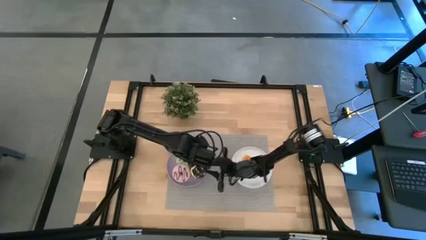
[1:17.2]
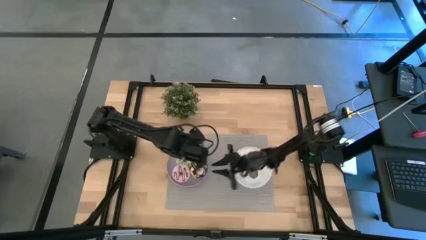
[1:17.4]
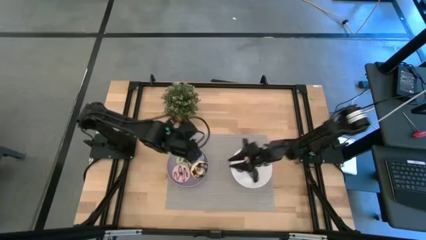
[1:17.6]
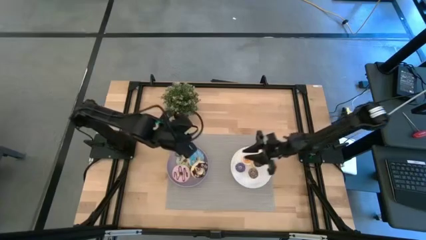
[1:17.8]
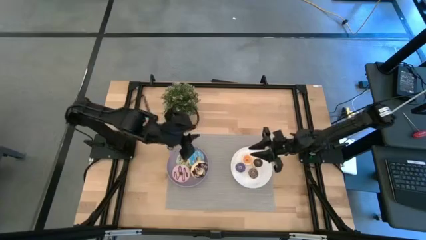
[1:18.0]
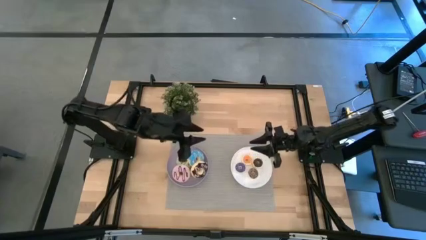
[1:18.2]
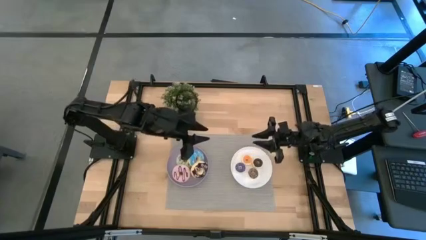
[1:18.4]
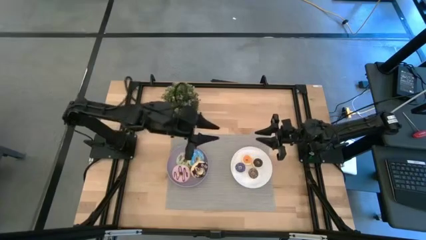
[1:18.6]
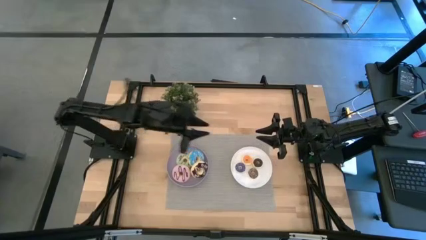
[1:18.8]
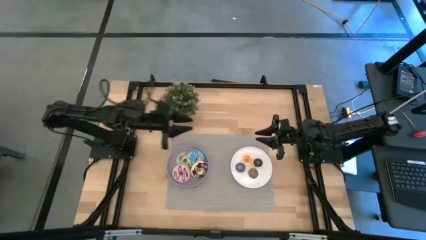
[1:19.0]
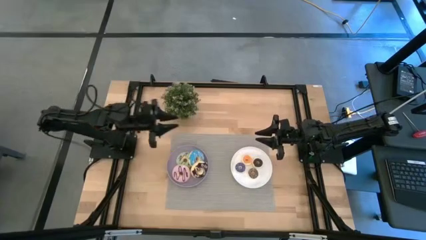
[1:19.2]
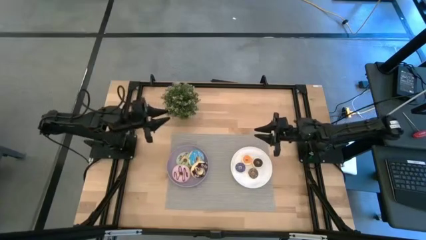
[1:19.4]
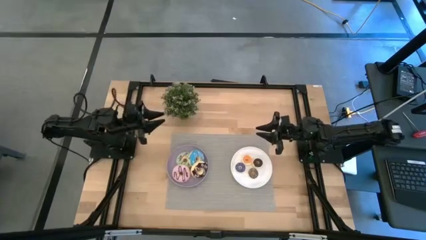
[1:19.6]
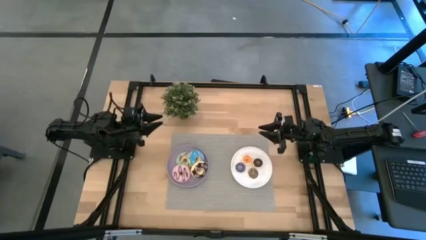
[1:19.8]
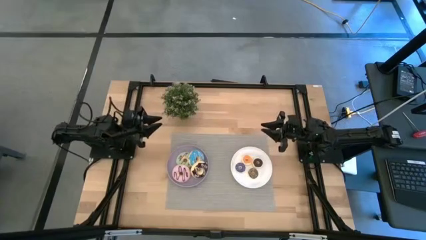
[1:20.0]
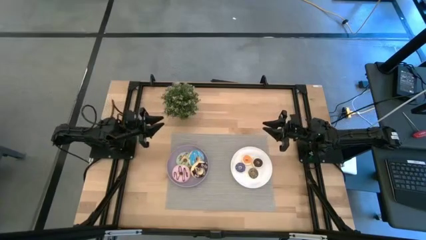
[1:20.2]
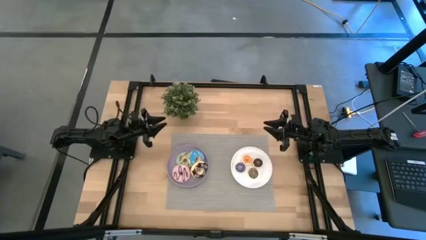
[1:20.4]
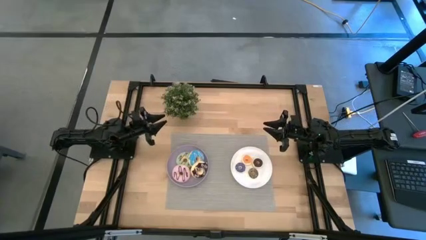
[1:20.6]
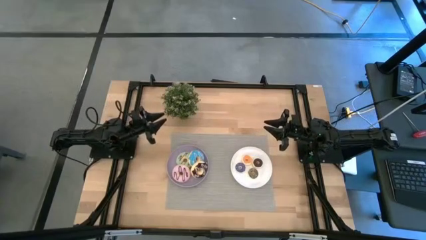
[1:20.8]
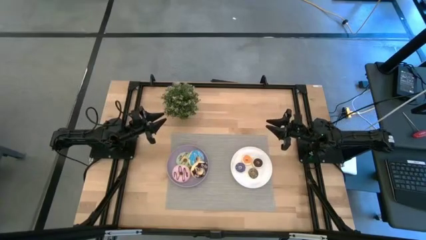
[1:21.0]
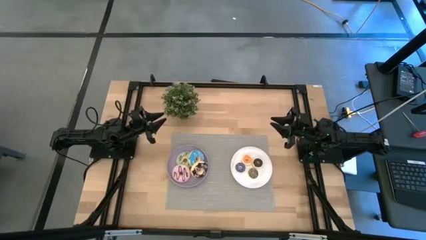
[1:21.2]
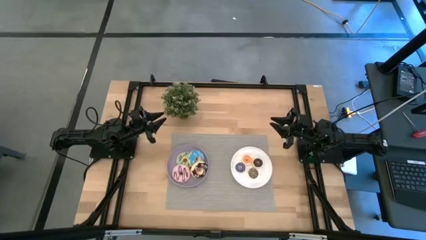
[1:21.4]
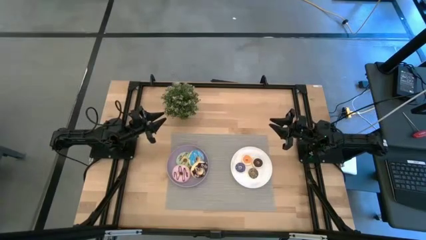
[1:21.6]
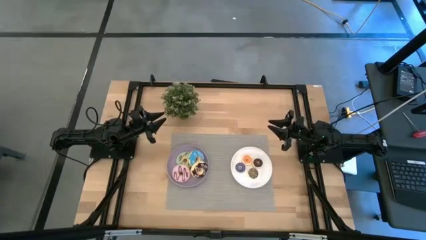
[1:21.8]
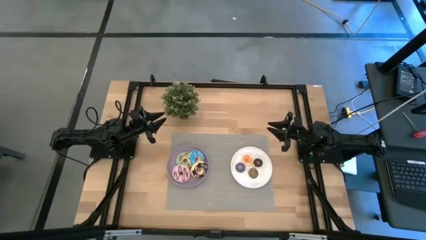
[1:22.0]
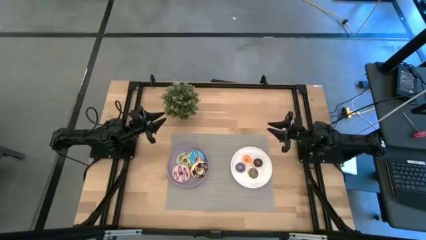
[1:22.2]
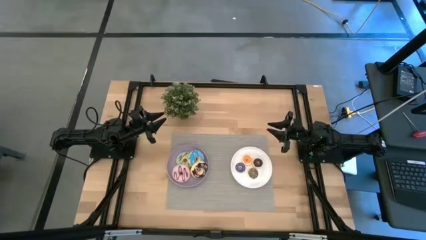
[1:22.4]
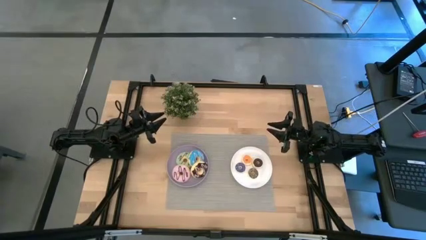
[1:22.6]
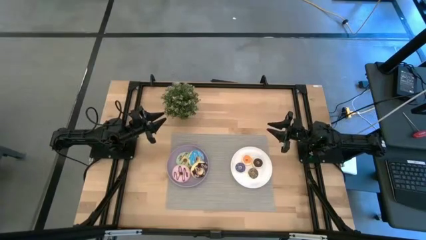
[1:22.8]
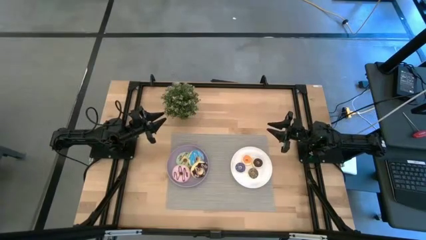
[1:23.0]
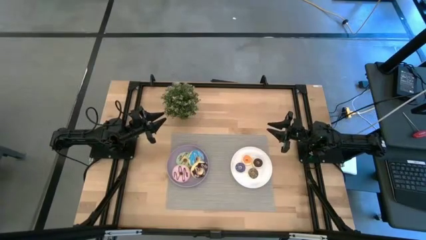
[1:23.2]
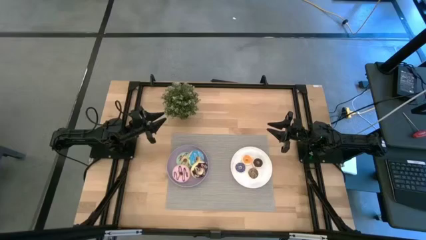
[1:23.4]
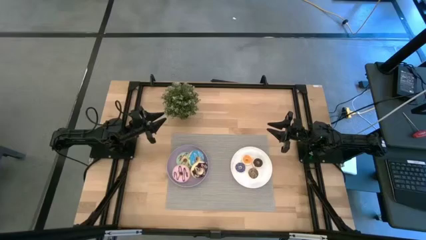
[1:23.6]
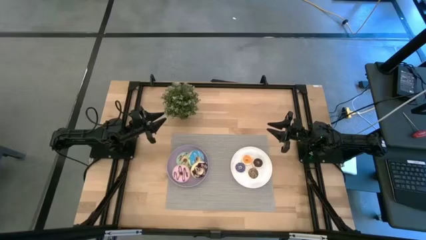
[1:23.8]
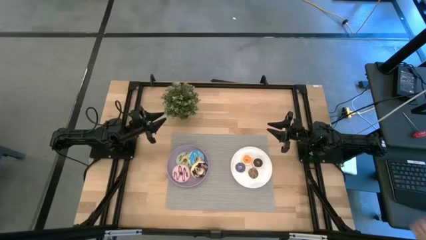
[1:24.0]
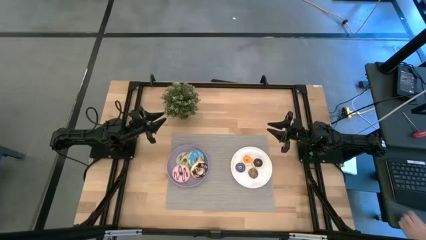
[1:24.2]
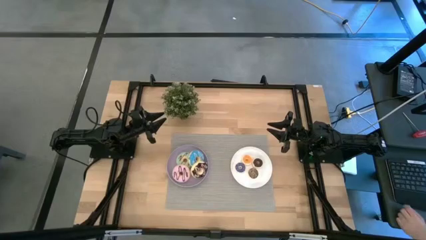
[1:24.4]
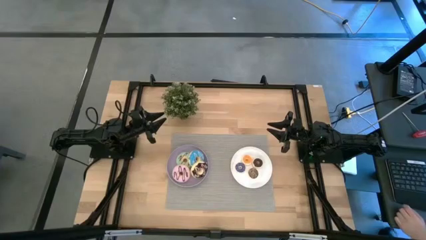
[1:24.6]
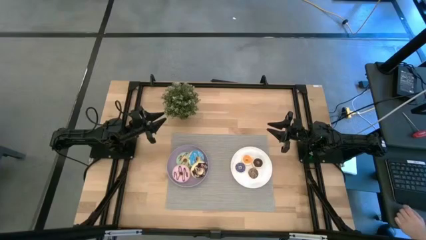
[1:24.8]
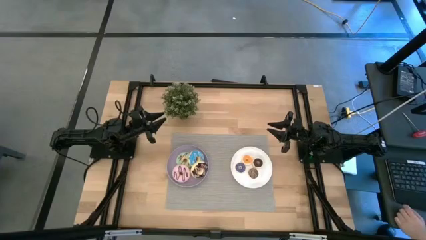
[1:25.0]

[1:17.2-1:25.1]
Task: Pick & Place donuts
Return to Home Position

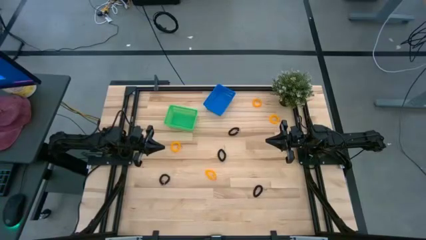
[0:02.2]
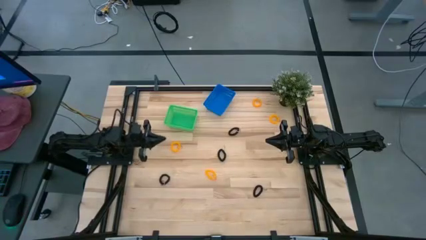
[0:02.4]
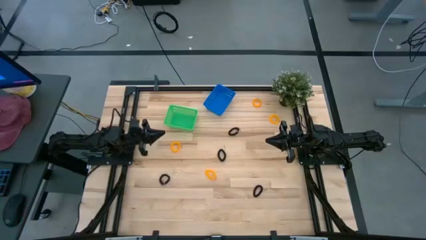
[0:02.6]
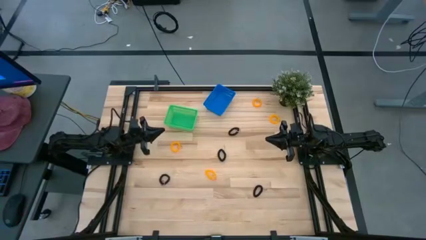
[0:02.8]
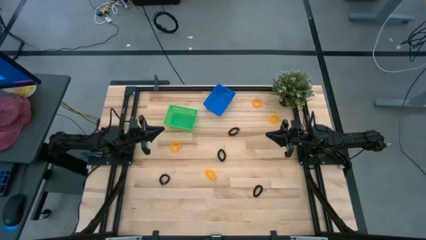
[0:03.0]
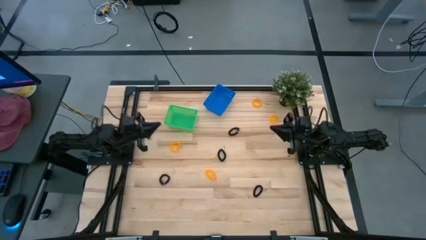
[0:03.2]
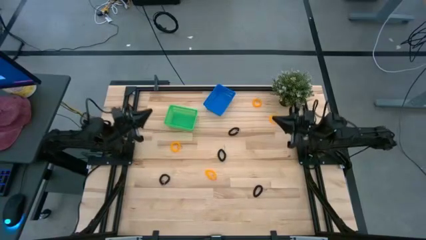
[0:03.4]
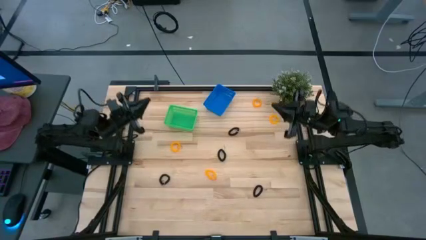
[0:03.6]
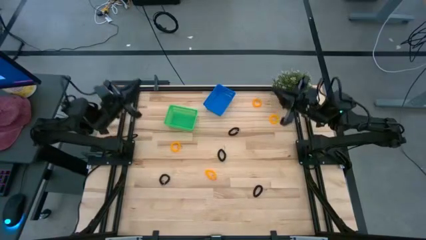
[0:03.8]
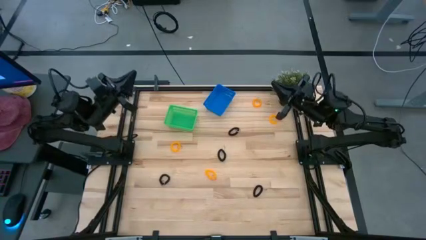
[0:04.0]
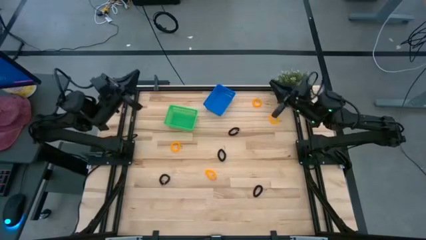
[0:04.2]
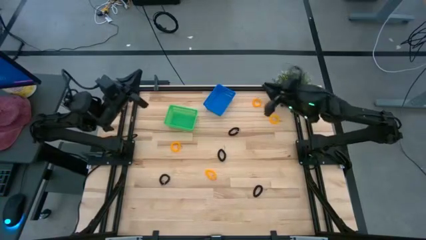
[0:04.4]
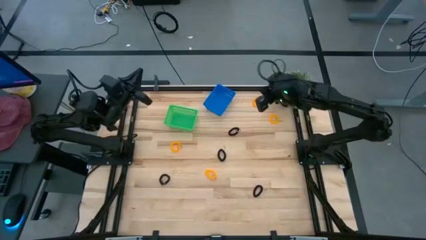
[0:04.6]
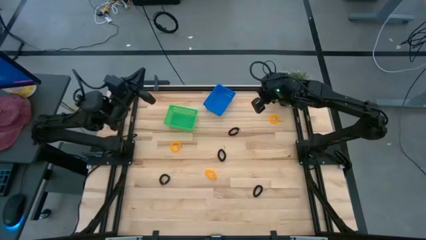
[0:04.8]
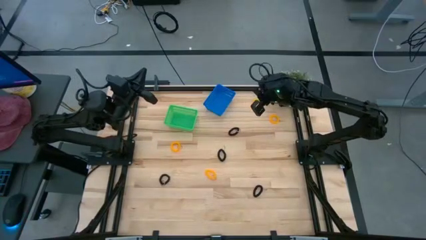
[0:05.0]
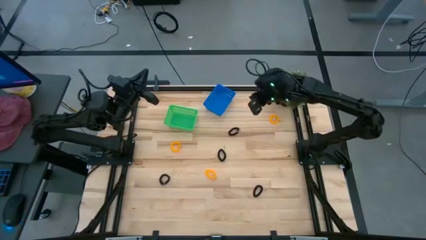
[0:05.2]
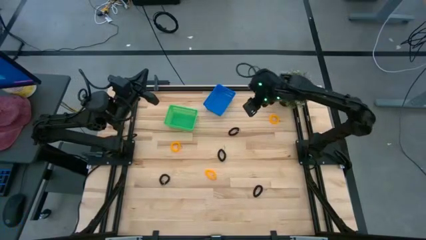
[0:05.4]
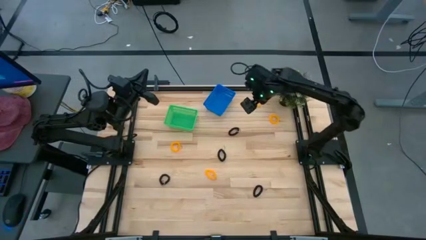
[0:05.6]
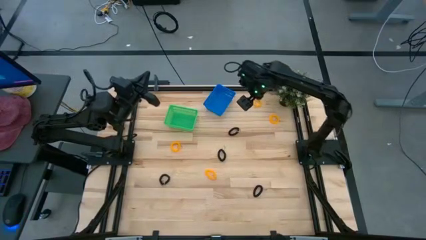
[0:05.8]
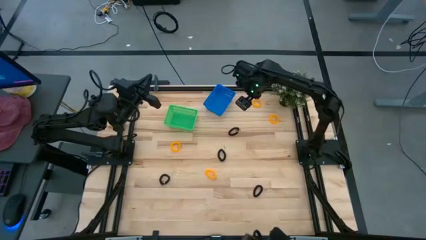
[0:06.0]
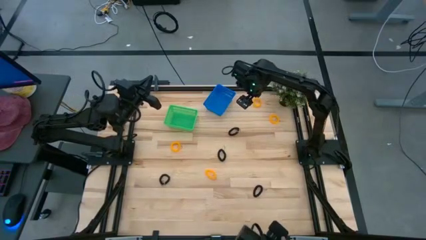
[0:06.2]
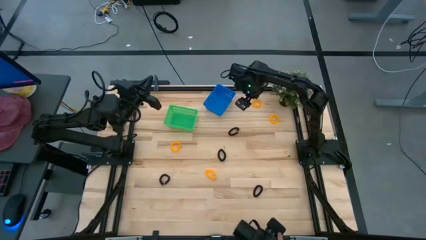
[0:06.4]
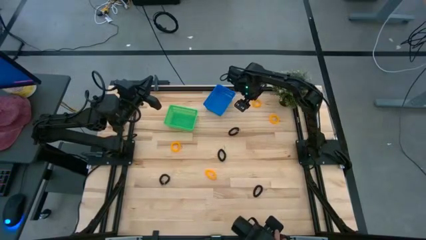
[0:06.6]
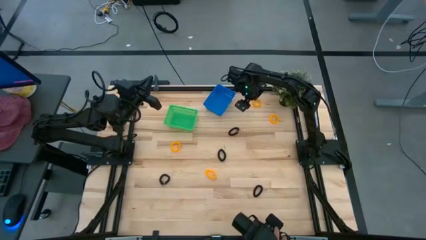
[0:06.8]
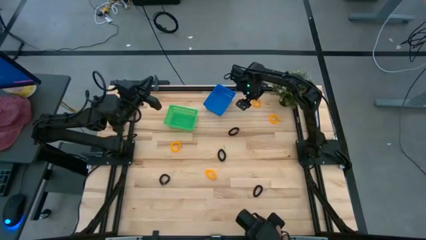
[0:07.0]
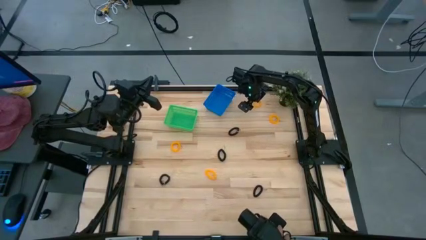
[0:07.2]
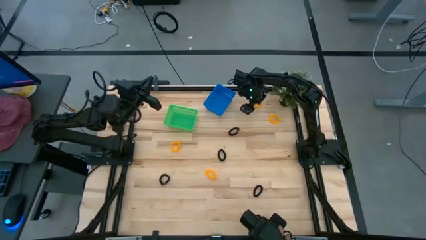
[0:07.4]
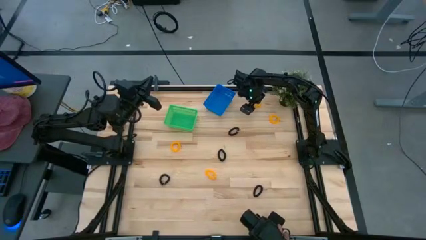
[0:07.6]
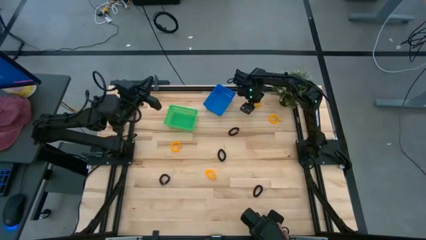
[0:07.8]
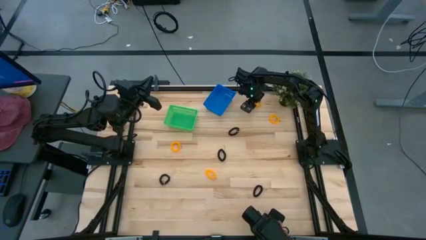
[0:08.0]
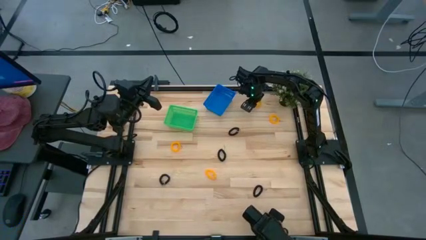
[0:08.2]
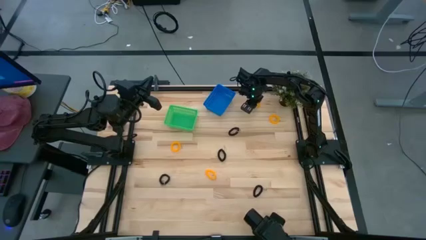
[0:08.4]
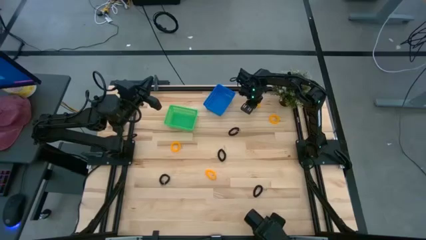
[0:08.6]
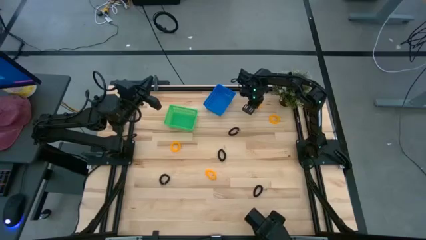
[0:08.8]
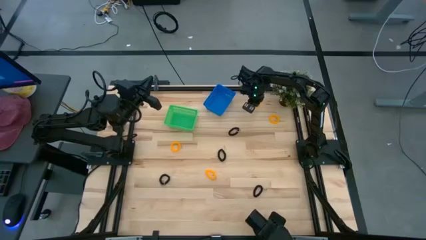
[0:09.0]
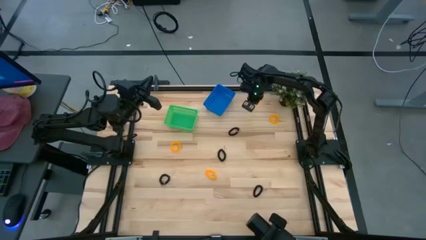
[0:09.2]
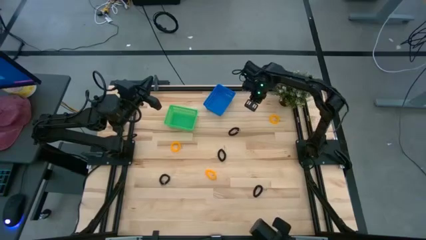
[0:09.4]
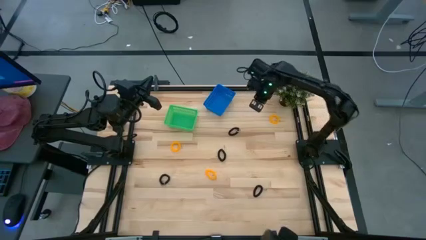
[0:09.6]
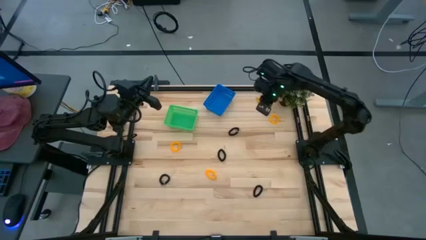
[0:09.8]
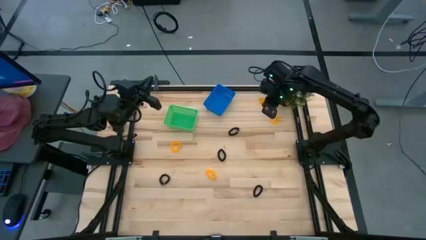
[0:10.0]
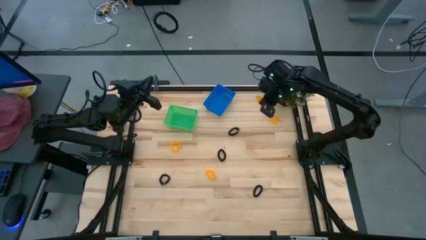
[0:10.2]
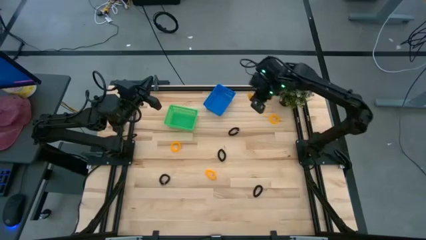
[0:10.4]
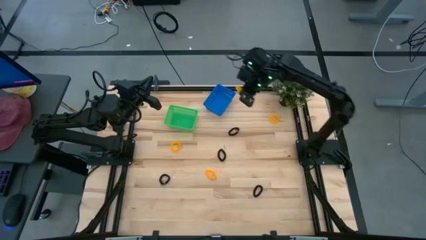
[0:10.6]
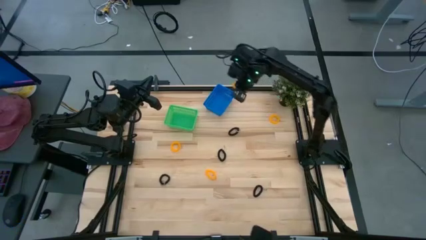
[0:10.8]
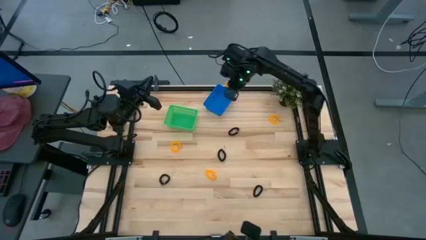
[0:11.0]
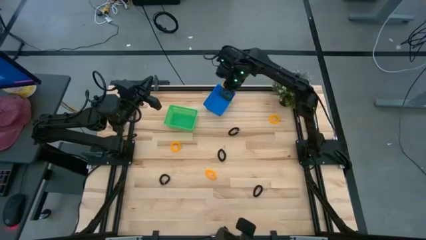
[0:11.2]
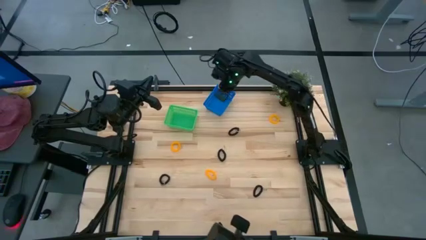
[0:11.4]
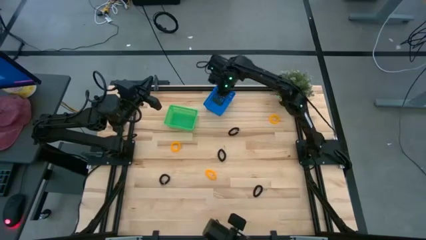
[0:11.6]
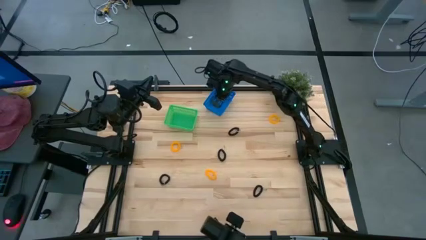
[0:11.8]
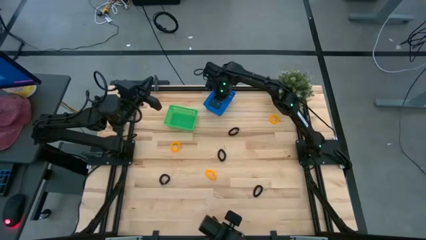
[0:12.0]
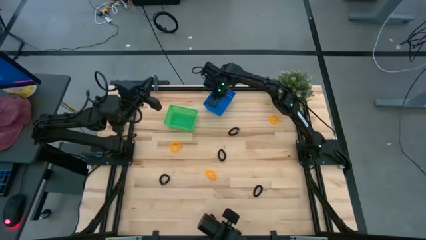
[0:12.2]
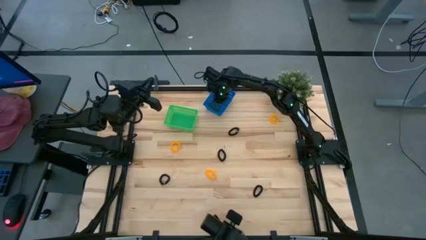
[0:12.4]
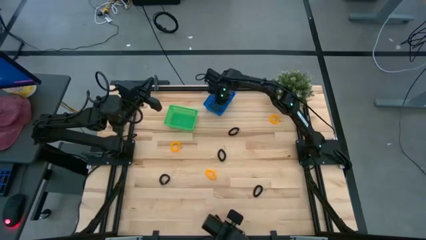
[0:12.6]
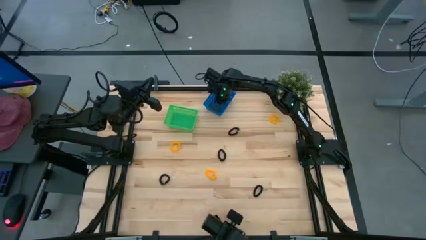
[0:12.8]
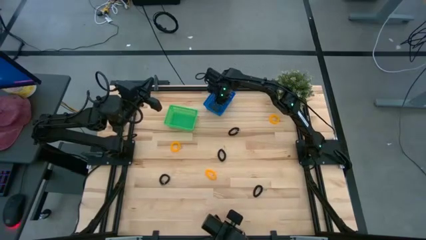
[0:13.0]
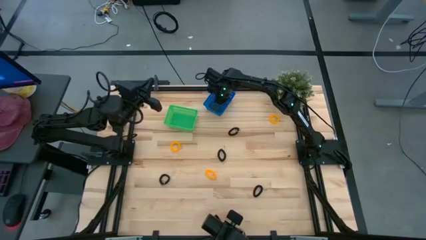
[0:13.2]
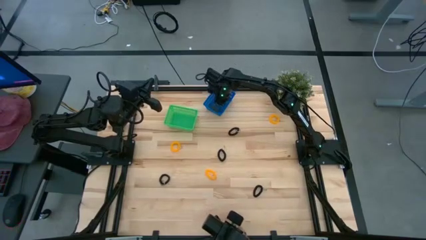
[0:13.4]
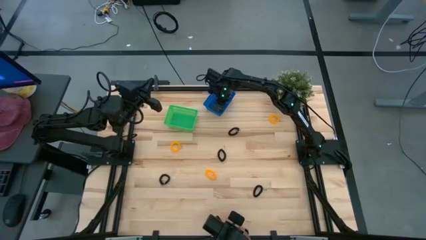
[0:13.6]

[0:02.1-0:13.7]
Task: Sort spring keychains into baskets
Put the yellow spring keychain into the blue basket
